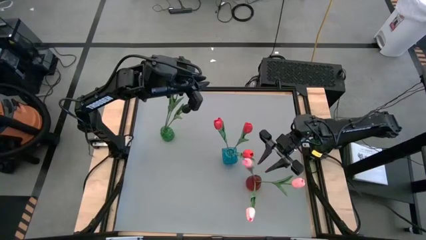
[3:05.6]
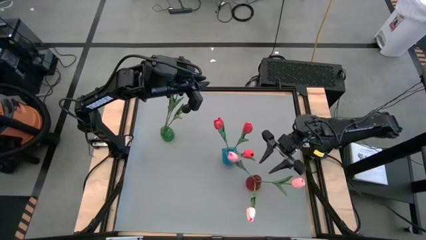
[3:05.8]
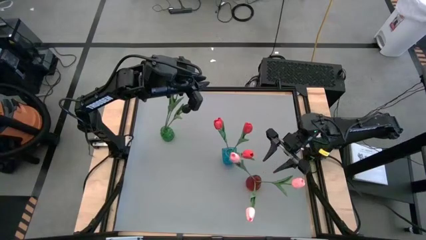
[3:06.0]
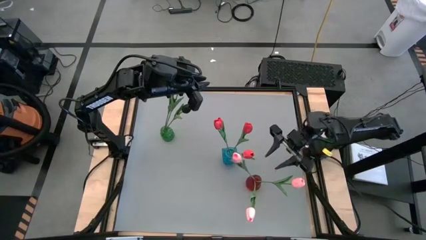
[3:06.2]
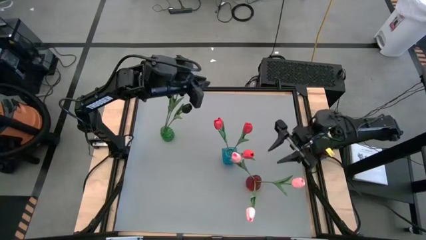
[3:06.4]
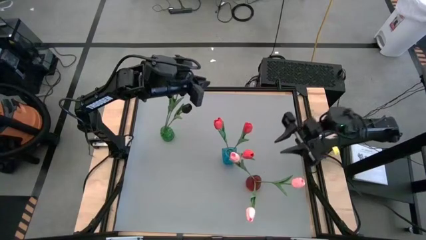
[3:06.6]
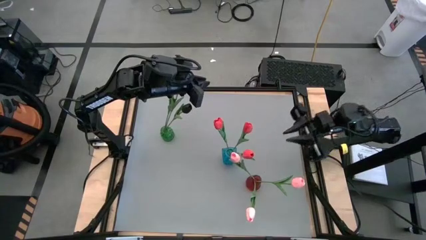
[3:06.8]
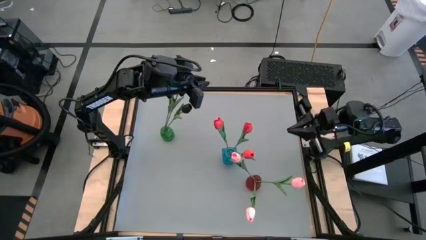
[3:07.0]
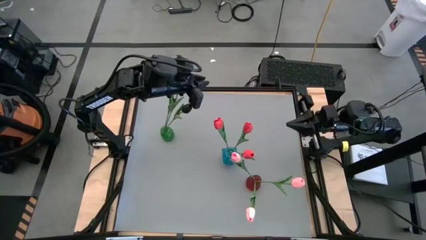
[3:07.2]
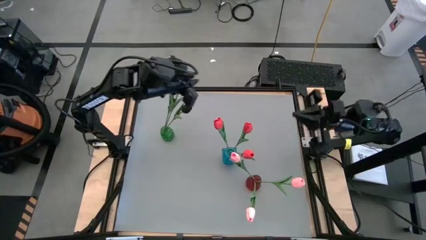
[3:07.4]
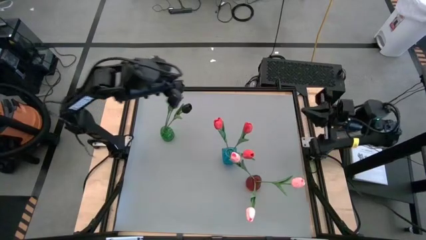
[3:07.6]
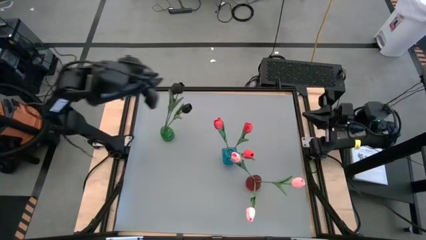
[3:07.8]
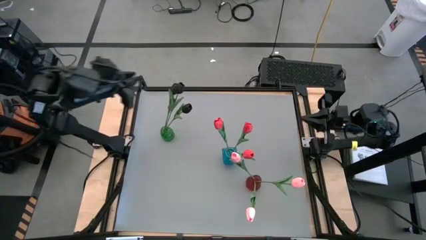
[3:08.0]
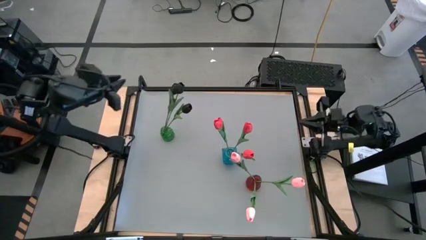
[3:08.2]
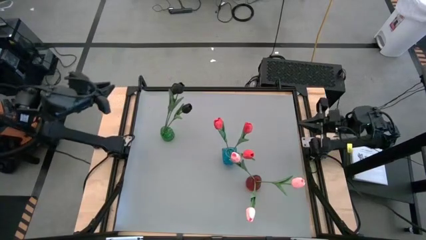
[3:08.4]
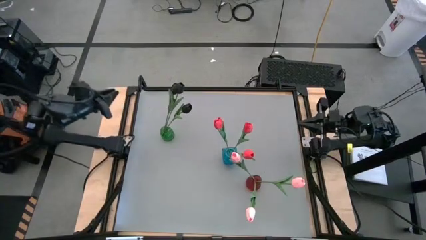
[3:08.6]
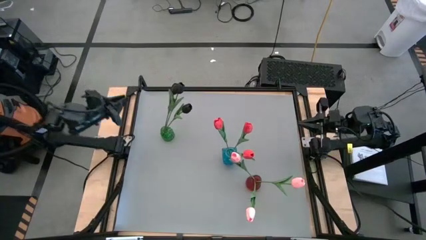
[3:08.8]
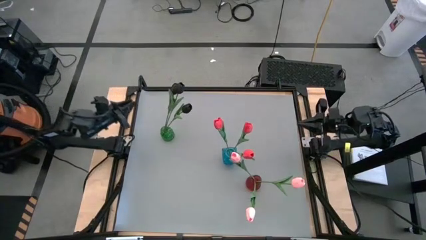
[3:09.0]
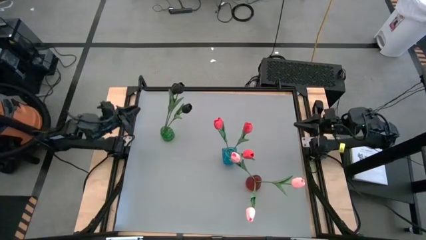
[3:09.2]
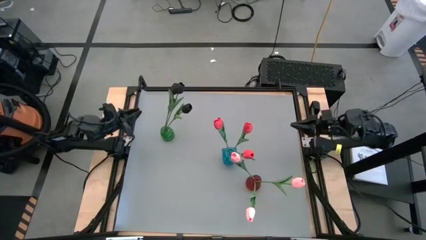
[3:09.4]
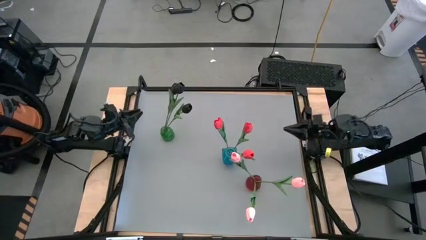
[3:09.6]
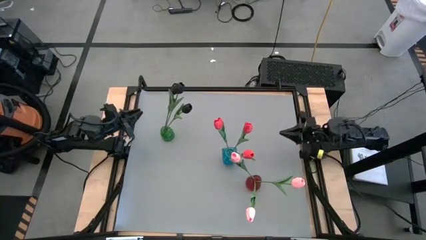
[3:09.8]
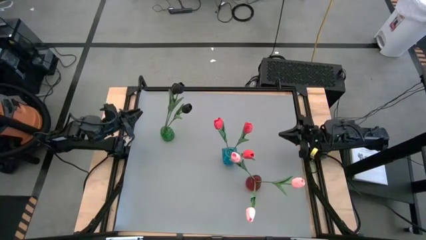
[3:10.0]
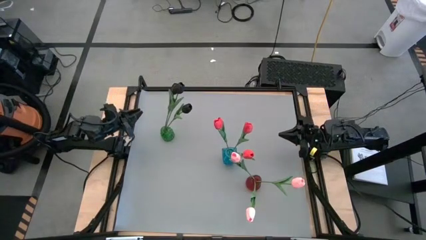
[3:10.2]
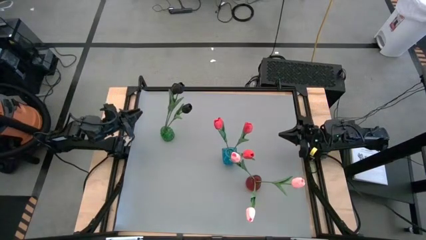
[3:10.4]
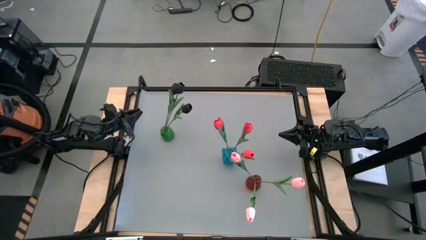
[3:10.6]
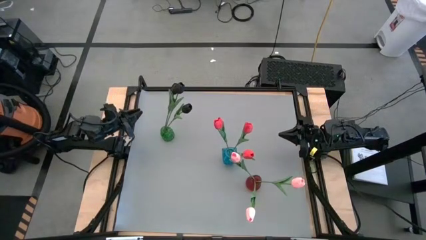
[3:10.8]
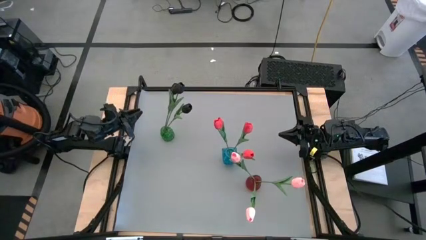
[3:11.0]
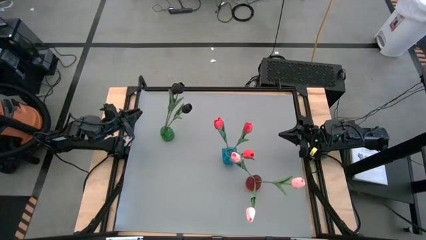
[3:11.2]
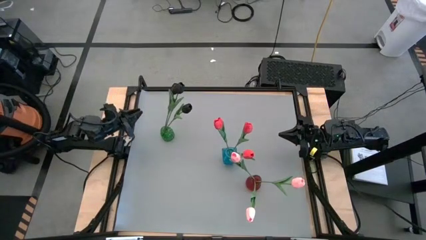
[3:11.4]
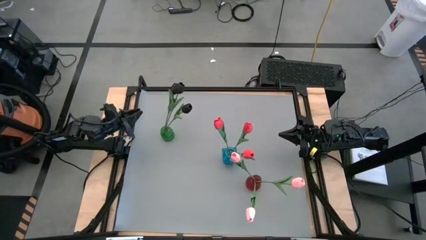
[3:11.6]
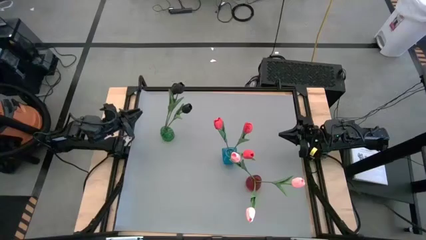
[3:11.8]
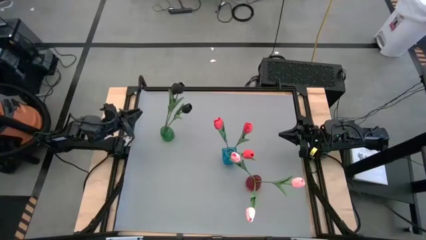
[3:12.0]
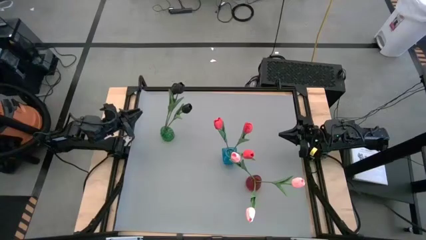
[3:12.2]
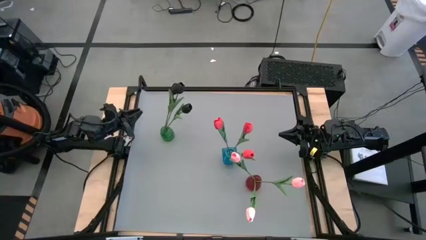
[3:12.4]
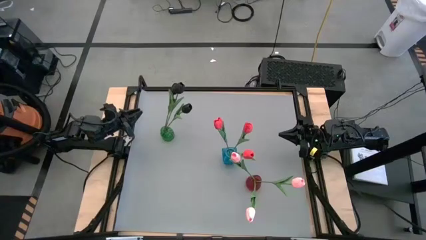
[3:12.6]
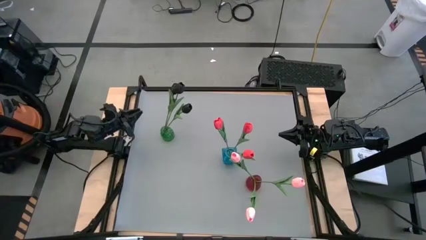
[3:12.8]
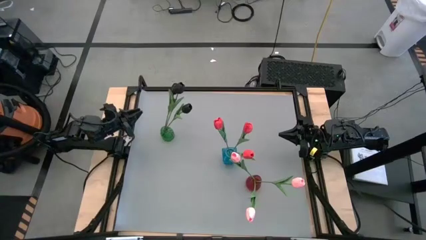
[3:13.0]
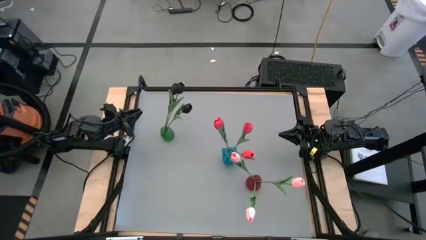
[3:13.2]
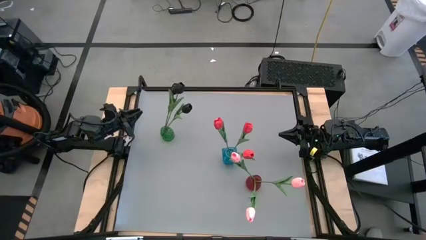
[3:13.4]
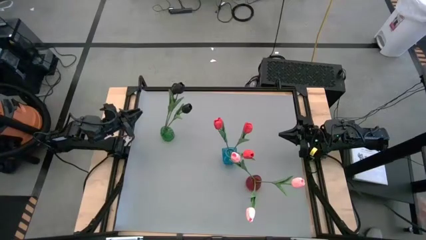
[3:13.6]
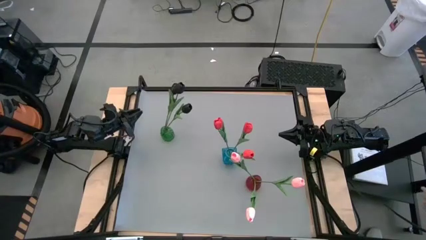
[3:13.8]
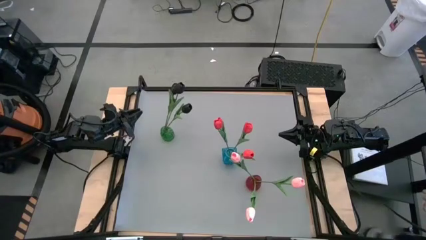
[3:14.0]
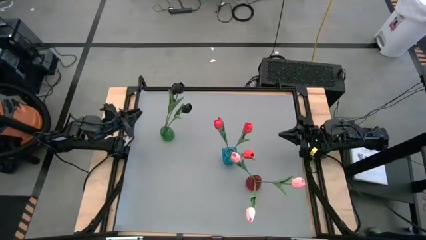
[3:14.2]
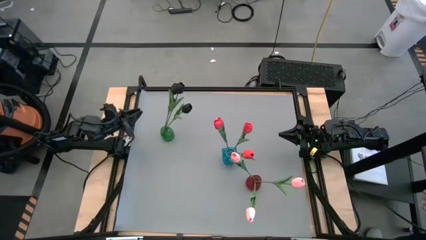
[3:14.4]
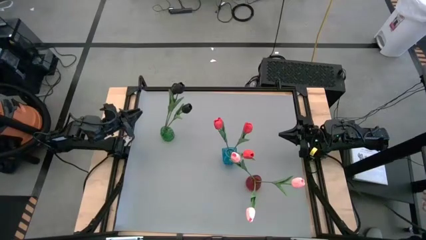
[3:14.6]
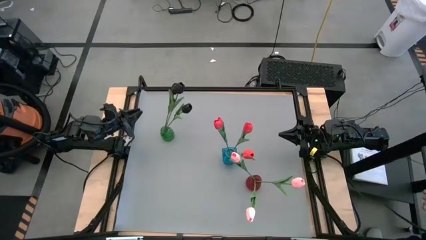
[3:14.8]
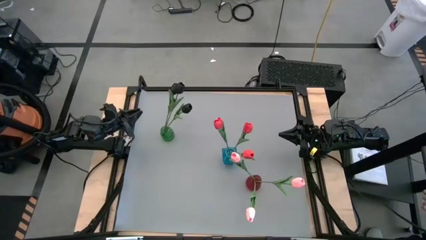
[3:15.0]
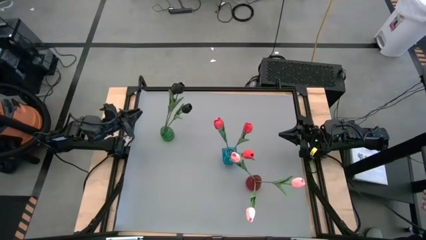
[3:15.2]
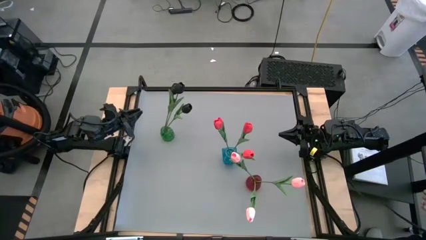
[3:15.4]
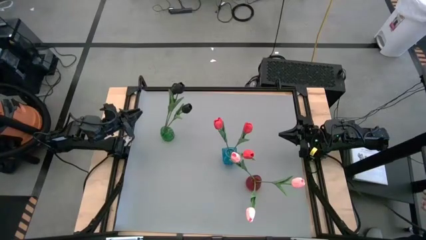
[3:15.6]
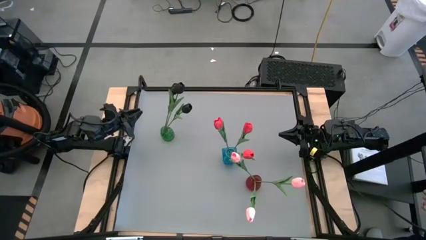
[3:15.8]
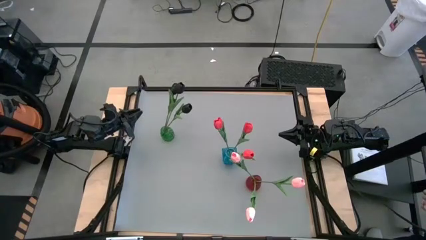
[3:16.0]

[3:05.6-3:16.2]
Task: Sort flowers into vase by color
Return to Home Position

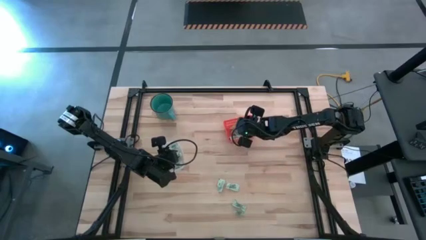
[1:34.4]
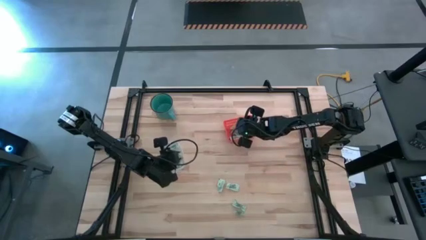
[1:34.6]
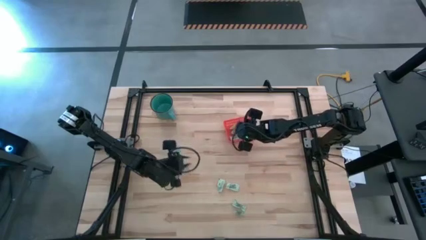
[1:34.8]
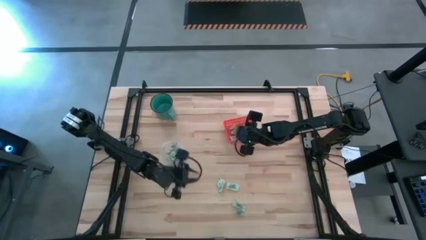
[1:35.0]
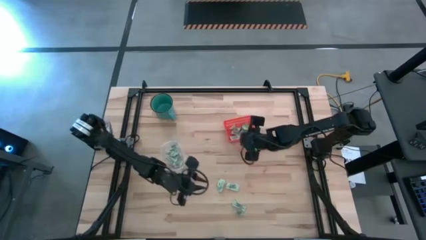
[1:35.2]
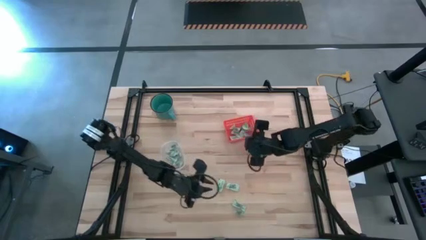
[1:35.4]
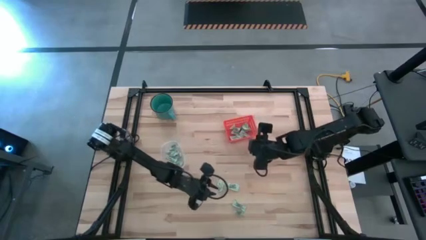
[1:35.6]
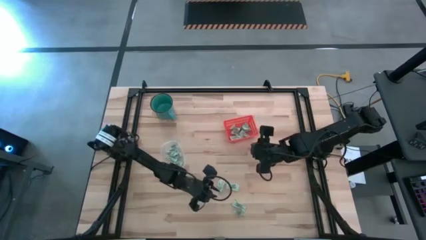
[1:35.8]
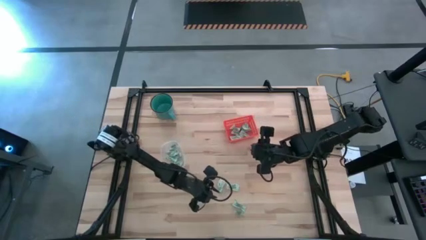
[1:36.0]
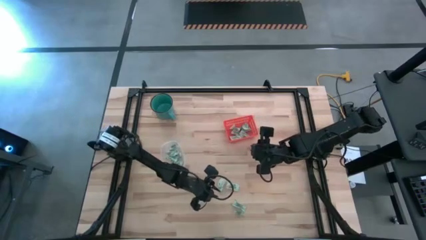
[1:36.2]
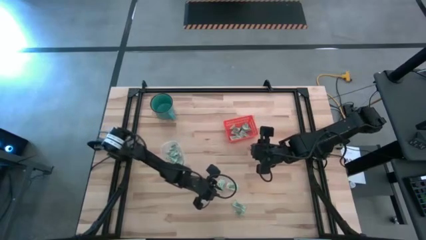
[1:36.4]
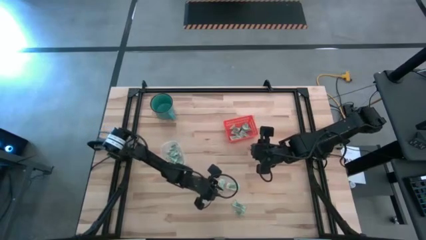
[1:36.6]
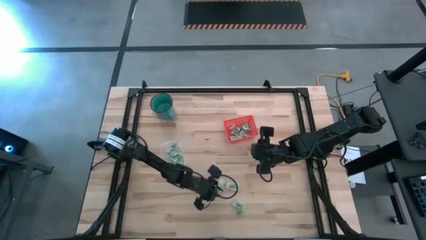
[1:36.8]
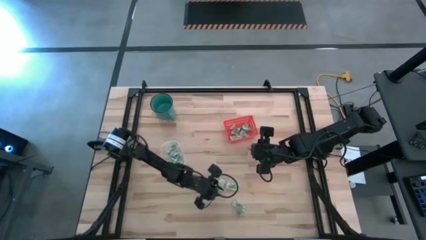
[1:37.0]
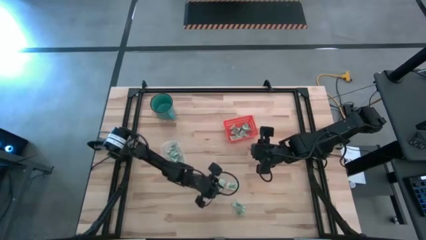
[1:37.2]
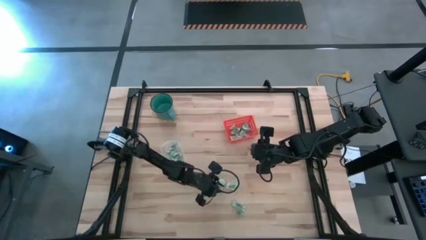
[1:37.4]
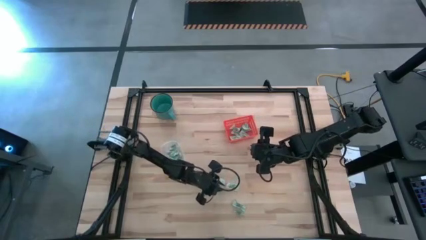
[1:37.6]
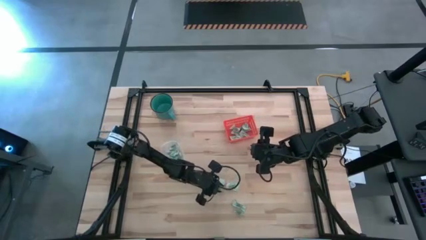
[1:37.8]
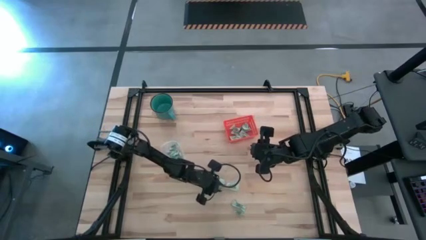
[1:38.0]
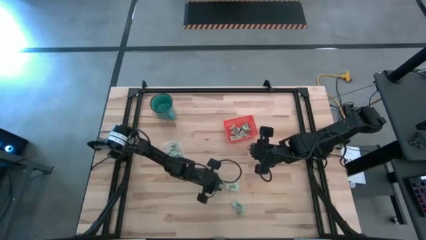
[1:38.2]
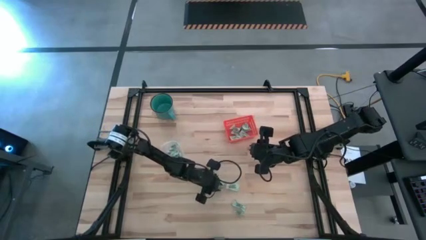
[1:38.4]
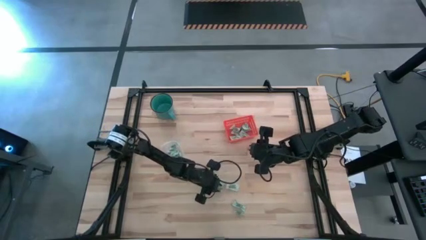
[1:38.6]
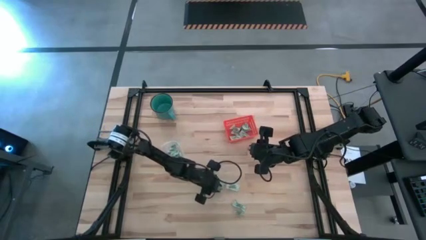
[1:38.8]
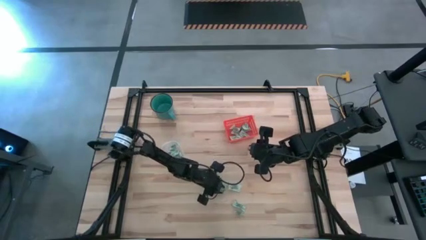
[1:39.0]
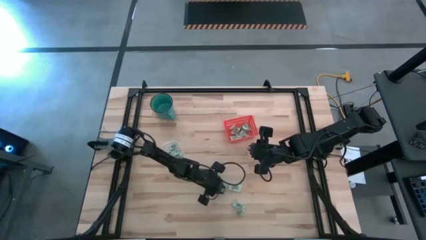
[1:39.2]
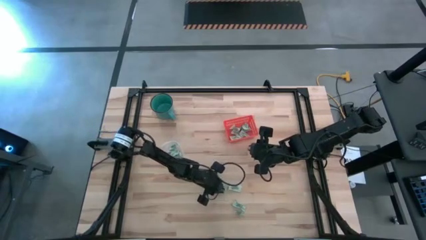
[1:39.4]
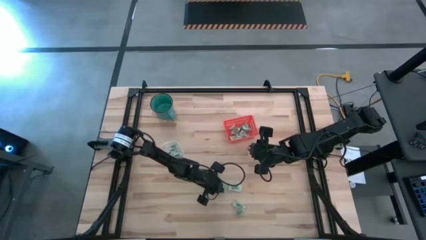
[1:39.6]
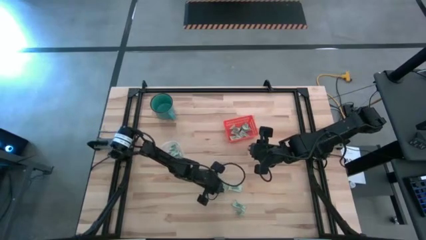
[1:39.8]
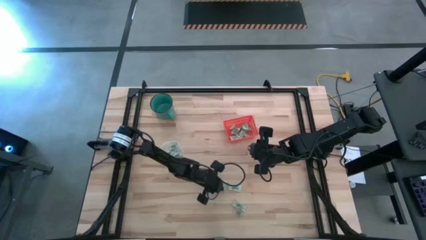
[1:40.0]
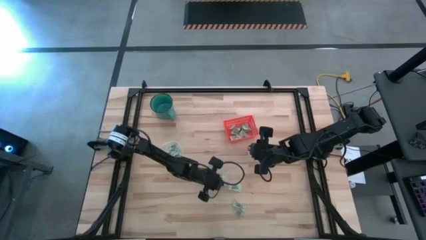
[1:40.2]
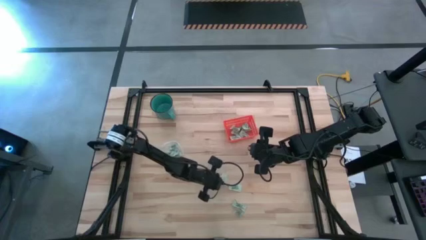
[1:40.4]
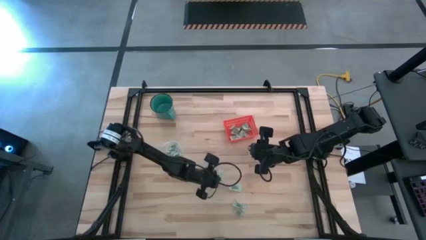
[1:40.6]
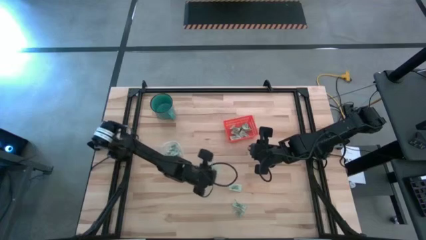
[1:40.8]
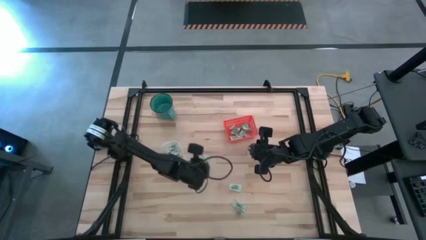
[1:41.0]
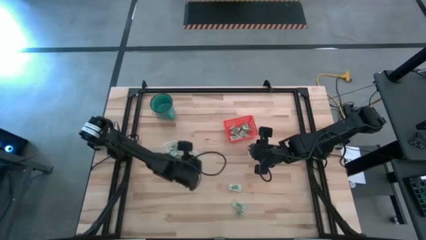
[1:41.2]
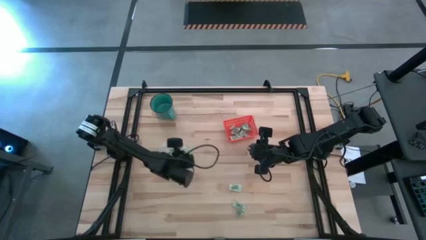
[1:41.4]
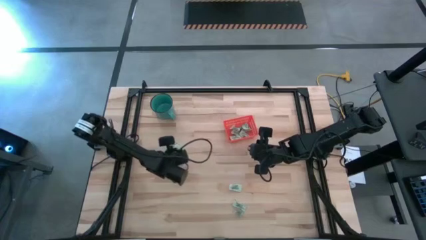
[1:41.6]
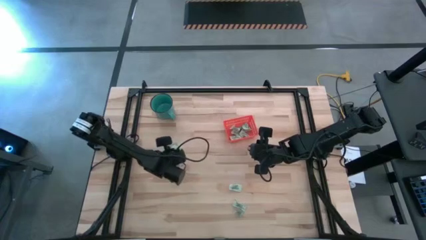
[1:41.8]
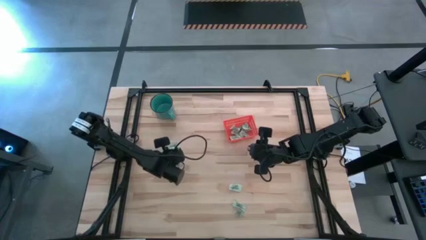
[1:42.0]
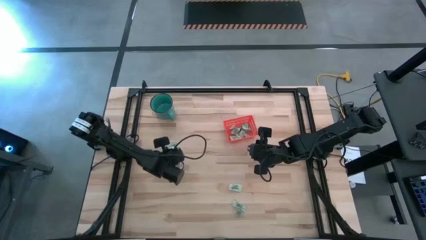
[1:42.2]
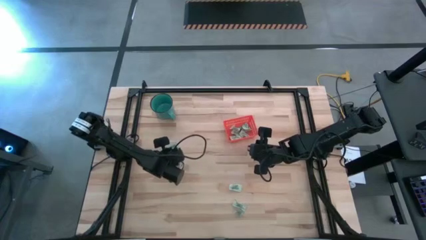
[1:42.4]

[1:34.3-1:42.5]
Task: Pick and place items into bin
Put the light green stevia packet into the transparent container
